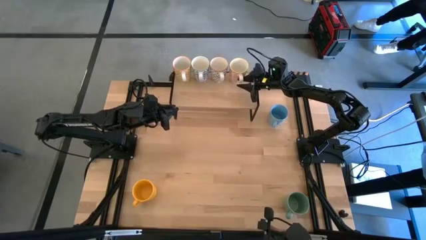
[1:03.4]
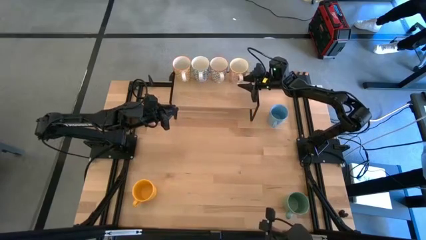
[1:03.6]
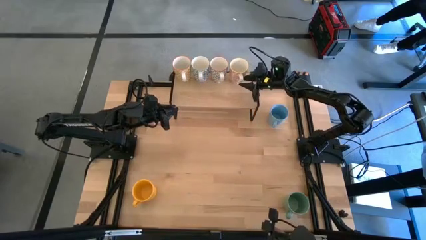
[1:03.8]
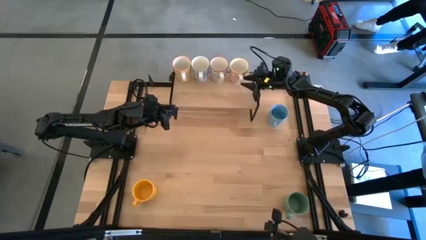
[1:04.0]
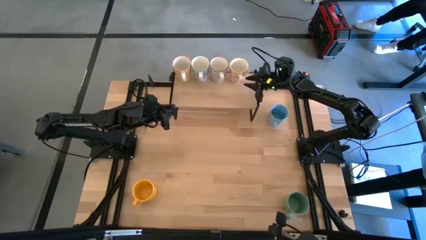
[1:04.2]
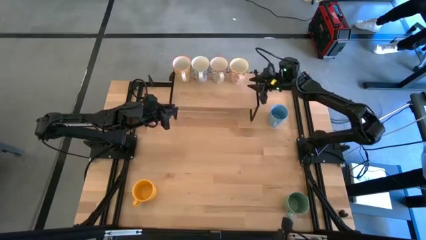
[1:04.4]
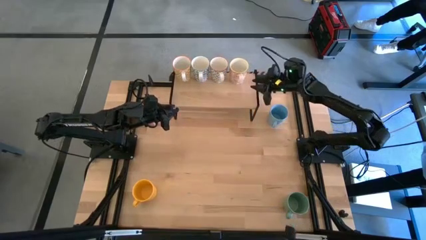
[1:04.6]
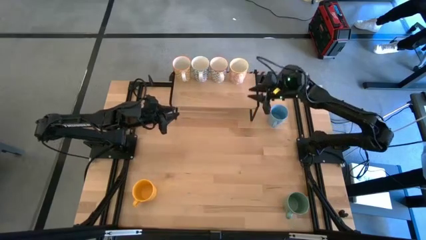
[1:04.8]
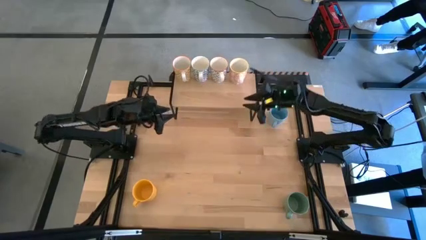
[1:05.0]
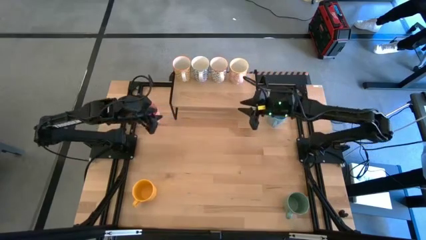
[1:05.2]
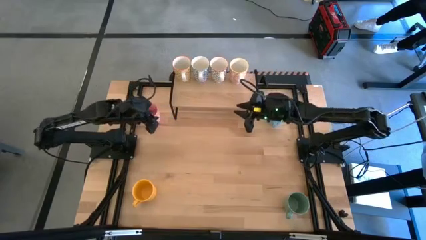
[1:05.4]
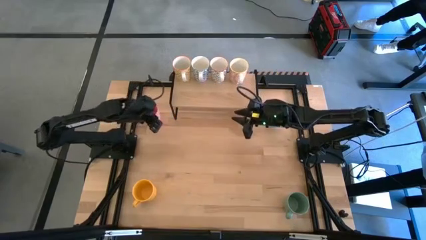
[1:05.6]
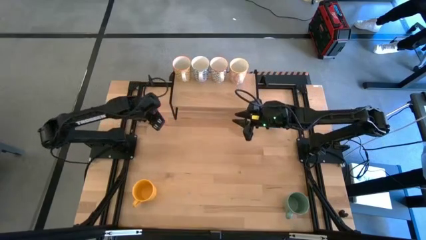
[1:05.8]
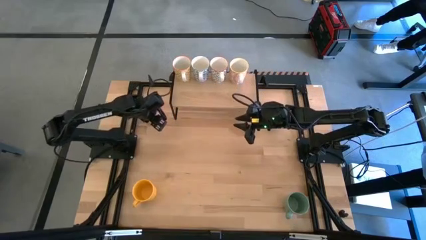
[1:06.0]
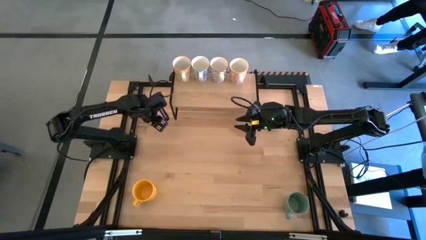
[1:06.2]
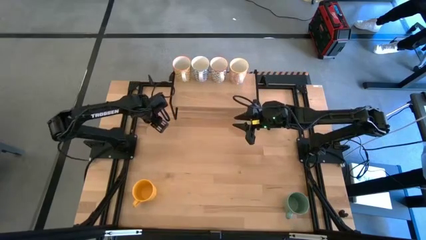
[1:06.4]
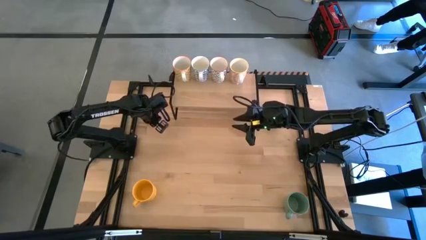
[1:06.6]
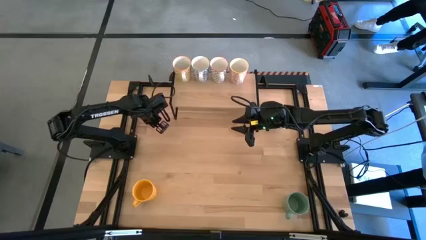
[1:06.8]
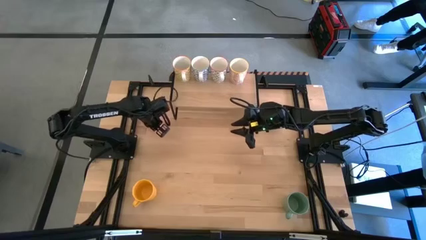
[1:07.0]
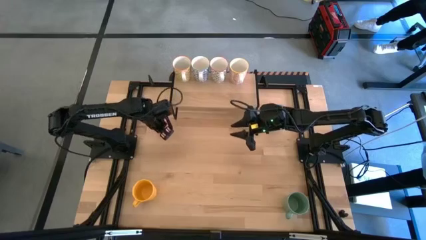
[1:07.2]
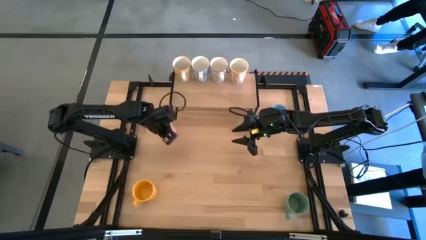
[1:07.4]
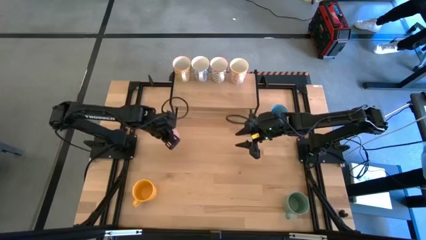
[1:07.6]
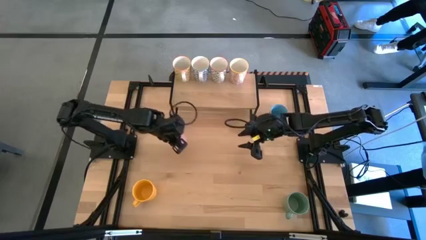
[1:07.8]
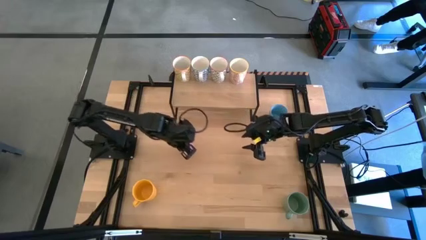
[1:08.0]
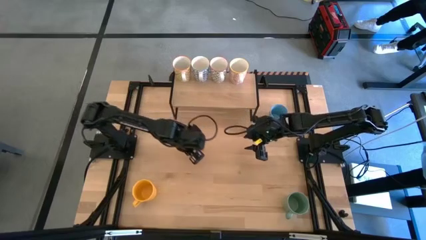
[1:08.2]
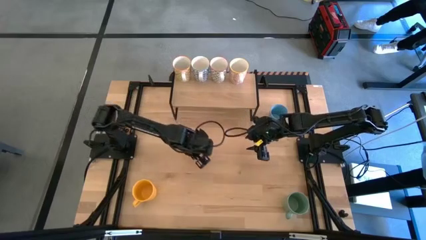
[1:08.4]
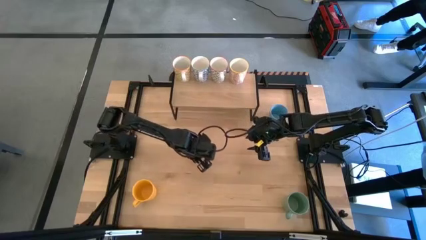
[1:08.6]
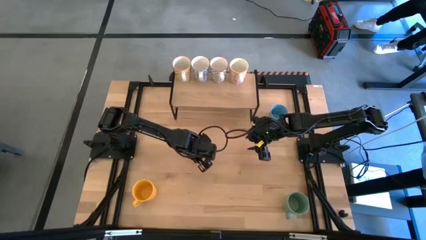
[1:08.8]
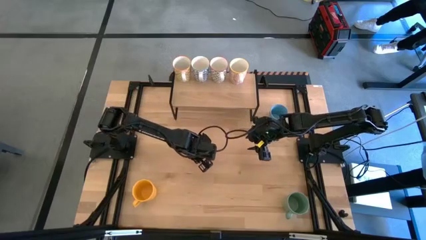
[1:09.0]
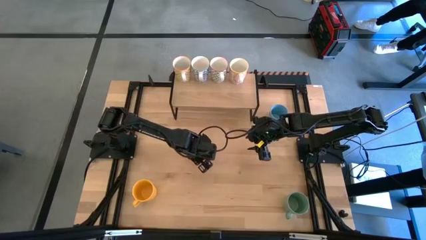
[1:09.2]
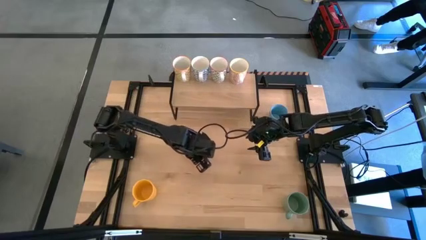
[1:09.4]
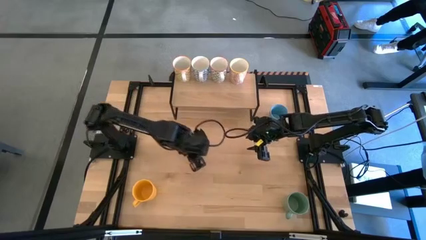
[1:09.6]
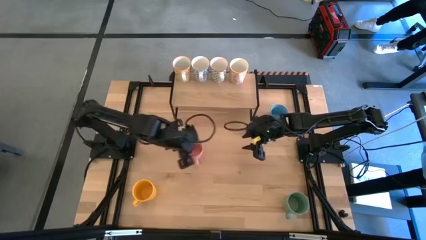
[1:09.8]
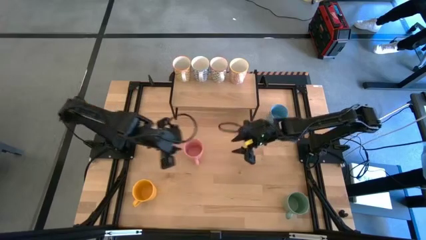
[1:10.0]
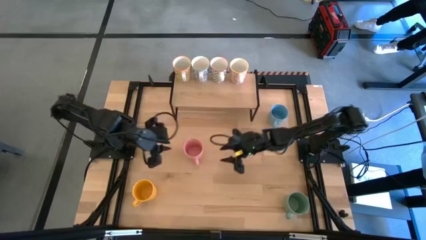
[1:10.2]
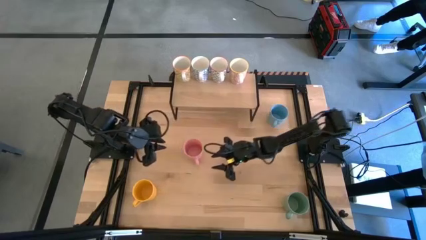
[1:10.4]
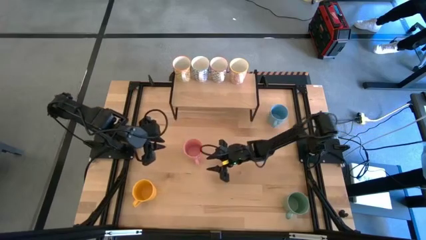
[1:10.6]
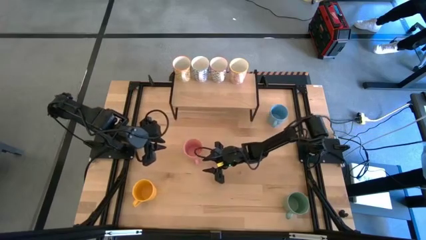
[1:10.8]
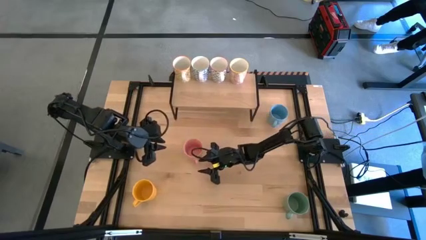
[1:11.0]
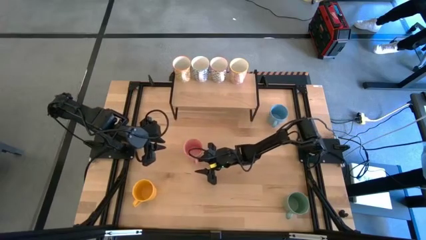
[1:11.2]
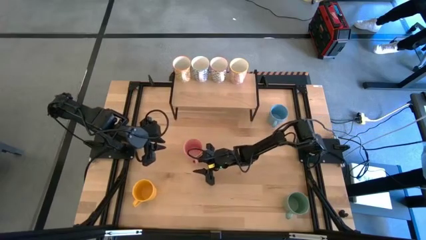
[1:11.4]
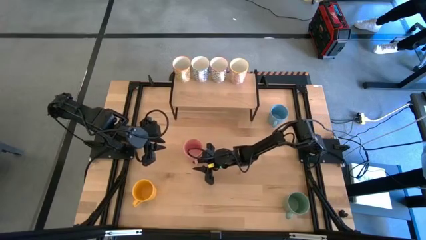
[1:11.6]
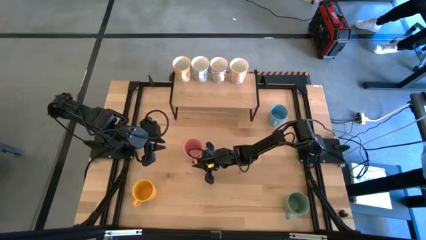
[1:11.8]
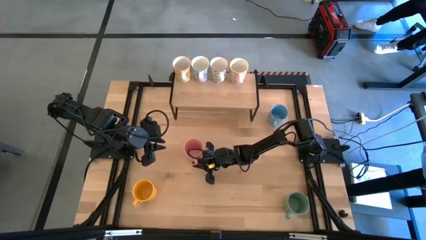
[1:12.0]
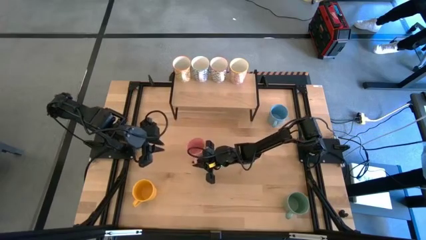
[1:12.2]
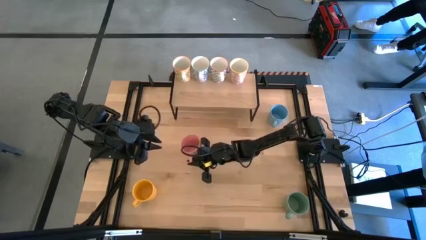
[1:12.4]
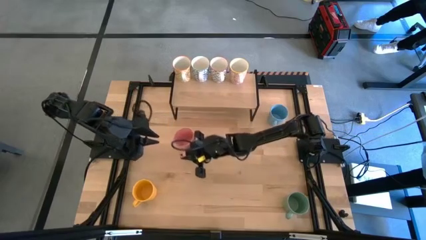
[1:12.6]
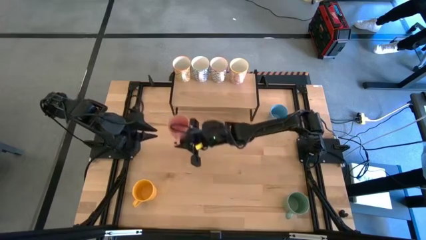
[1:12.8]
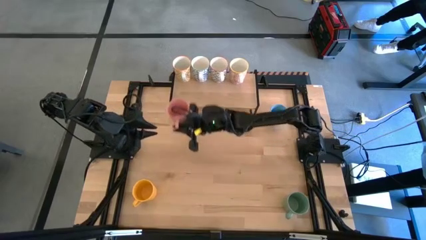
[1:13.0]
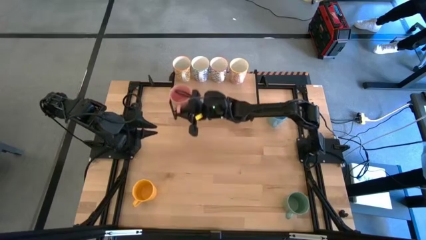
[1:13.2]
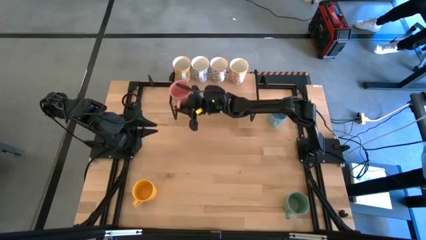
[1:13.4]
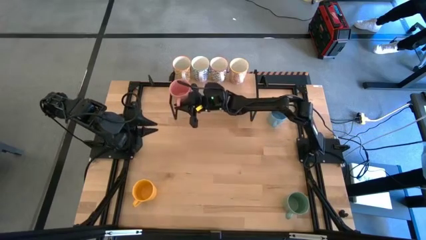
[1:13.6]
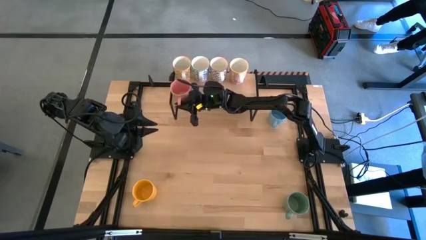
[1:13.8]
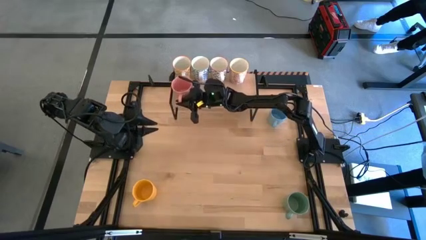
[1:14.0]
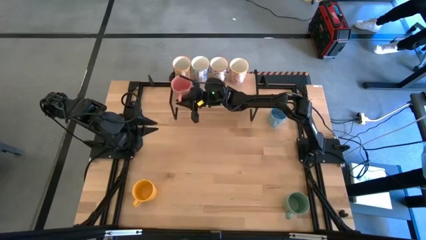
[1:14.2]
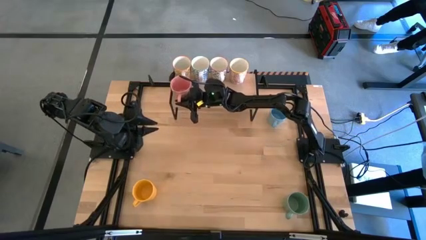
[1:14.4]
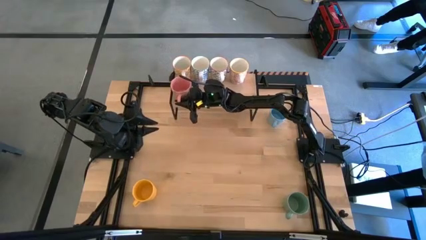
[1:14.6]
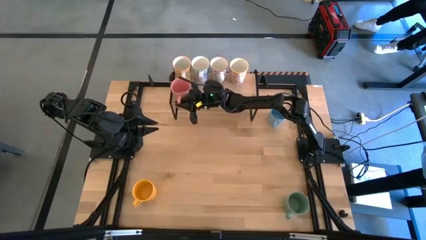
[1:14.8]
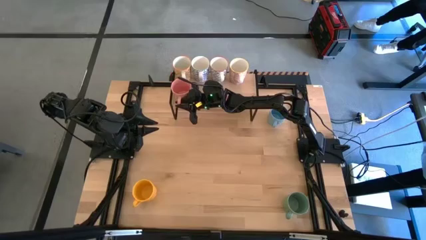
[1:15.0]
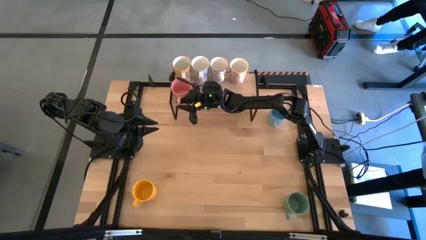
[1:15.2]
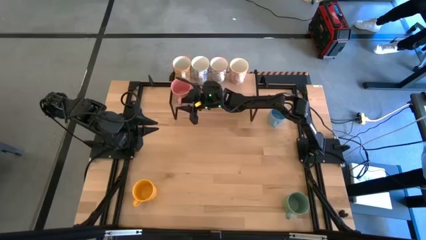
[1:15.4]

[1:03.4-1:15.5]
Task: Place coffee mugs
Put the pink mug on the shelf
